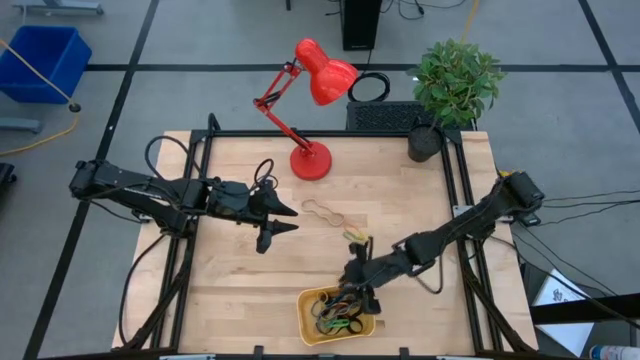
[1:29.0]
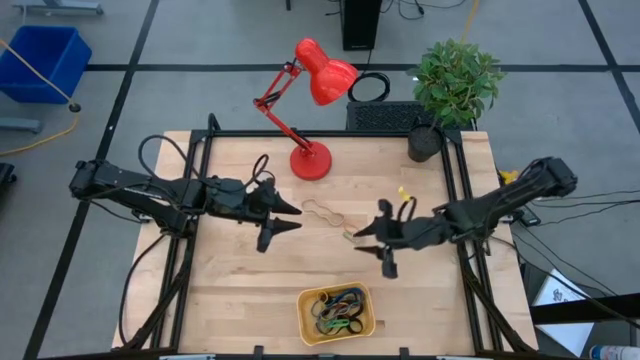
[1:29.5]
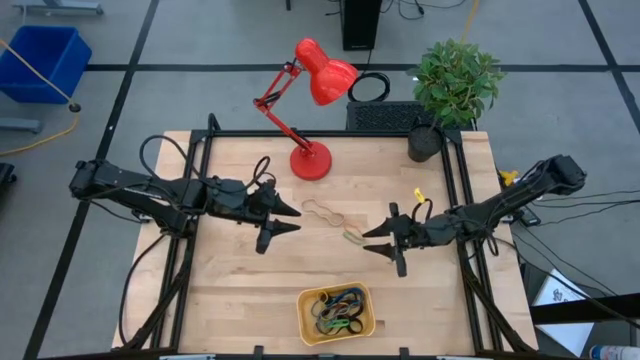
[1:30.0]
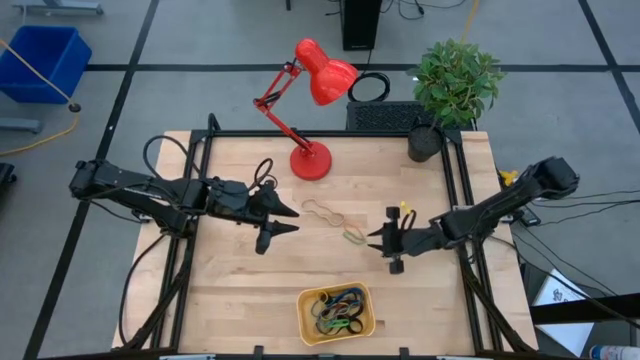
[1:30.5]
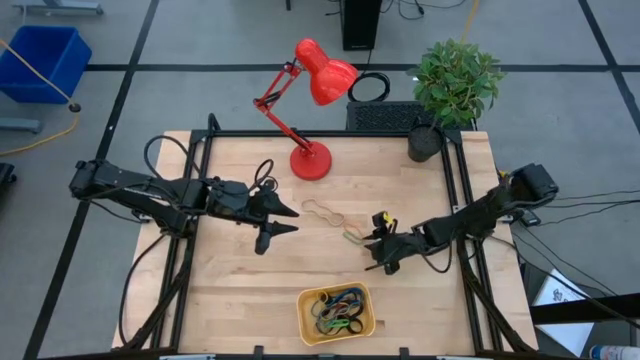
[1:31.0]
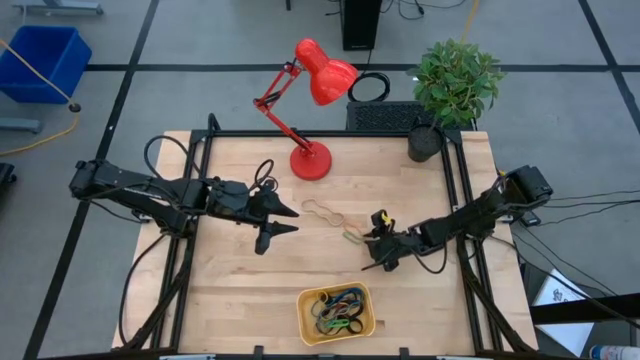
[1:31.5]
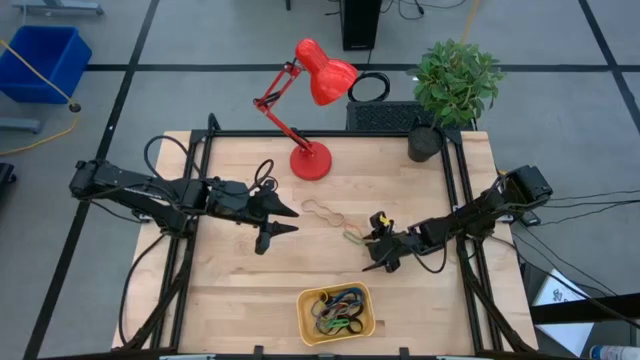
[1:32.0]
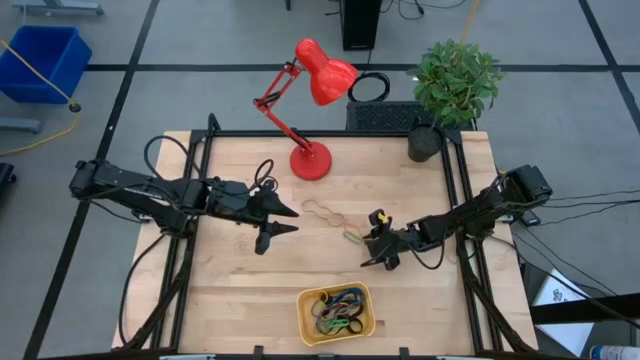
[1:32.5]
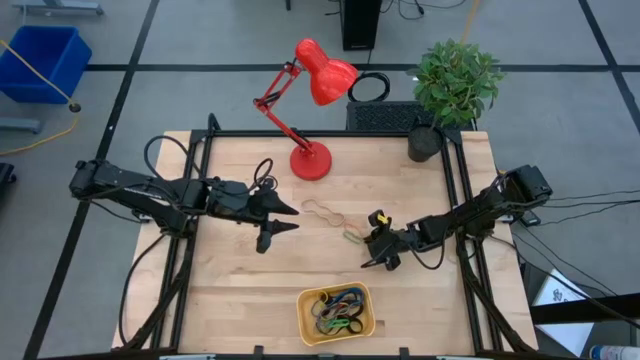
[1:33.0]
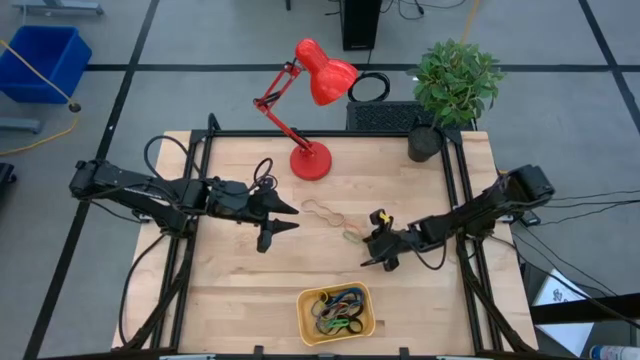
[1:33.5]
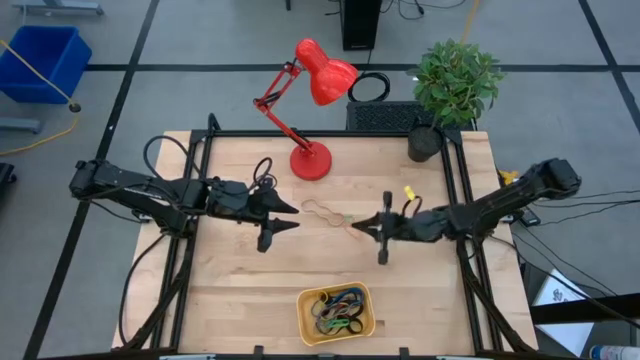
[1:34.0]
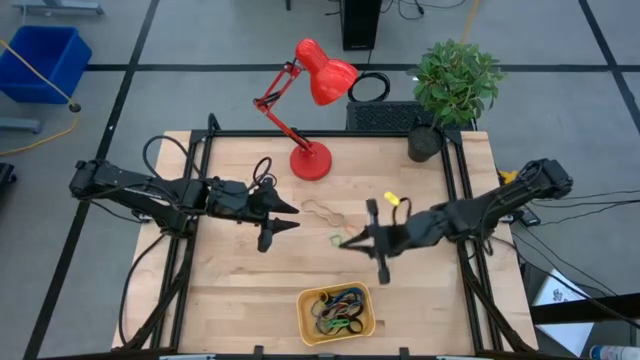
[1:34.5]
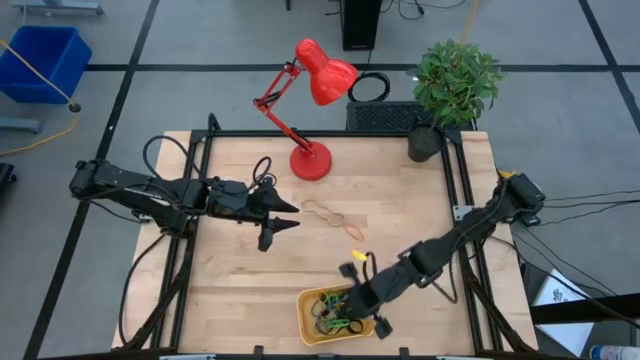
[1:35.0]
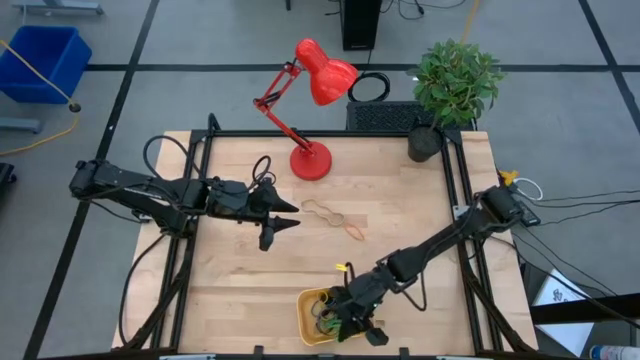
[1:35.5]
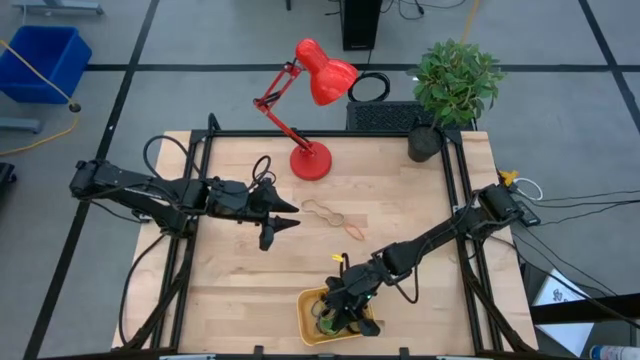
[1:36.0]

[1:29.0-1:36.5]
Task: Pick and place rubber bands into bin
Put the green rubber band into the yellow bin

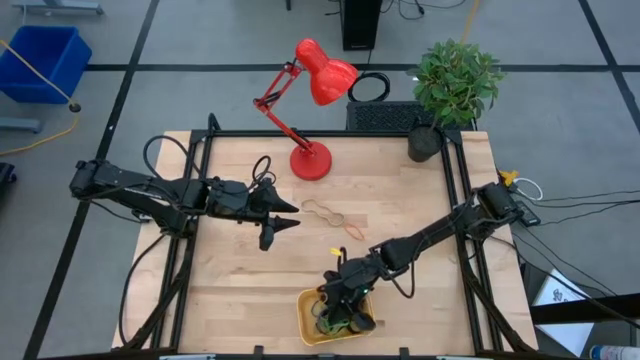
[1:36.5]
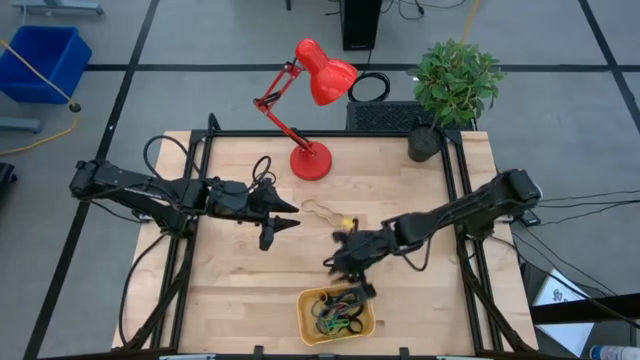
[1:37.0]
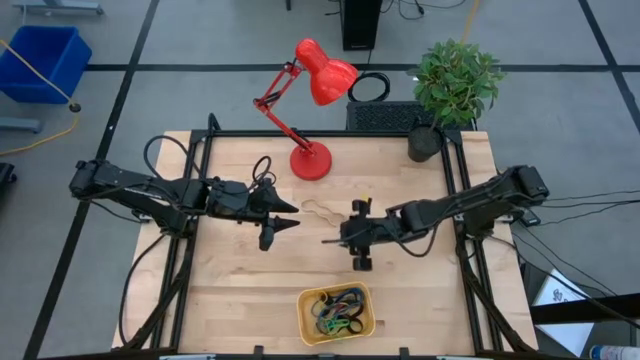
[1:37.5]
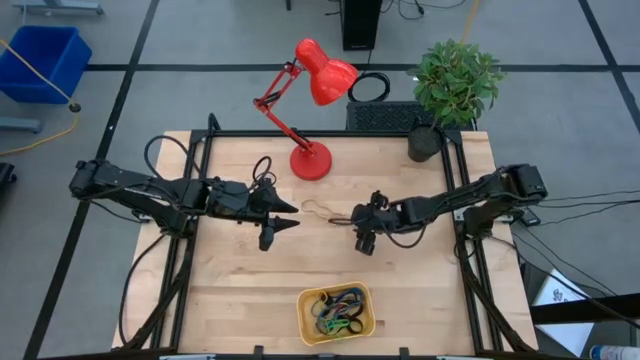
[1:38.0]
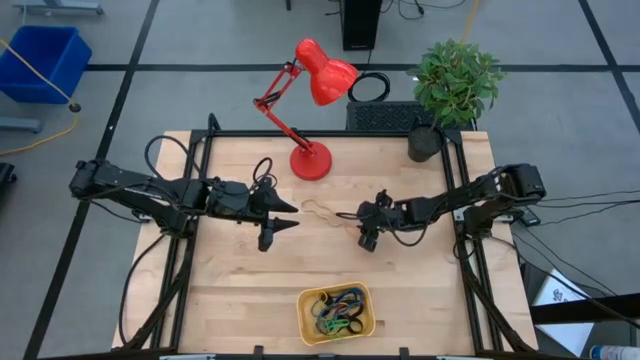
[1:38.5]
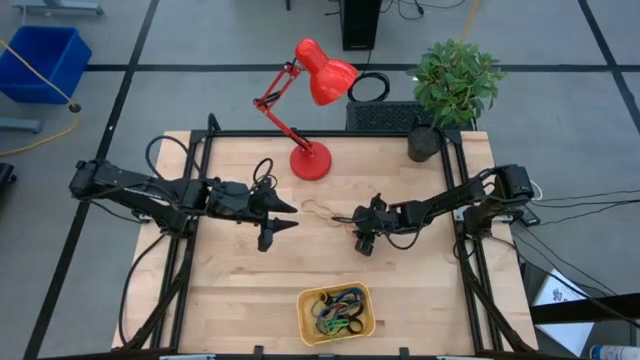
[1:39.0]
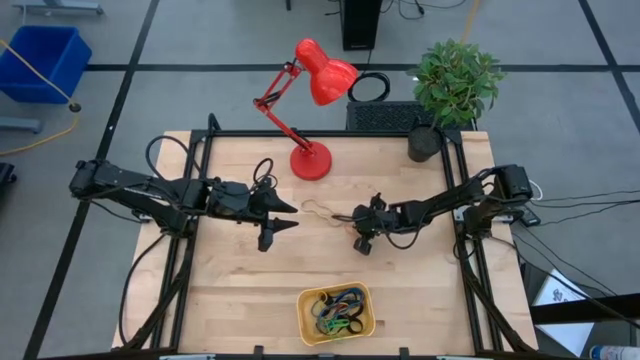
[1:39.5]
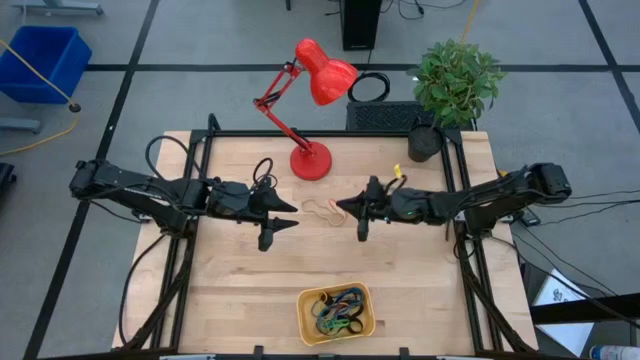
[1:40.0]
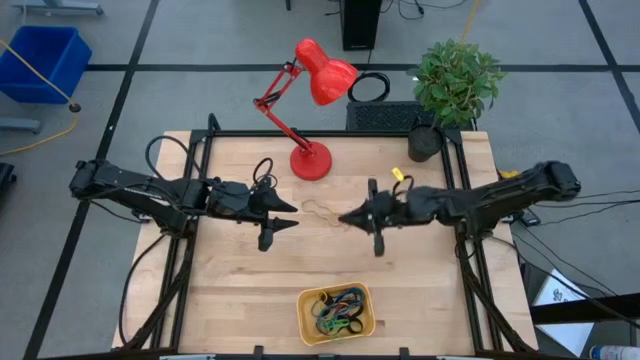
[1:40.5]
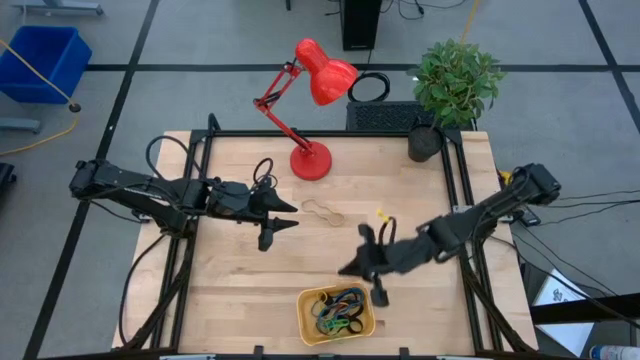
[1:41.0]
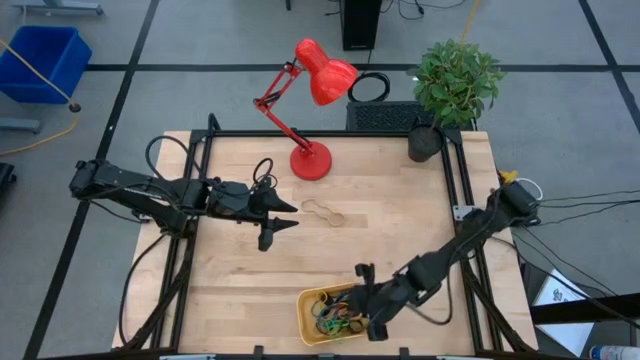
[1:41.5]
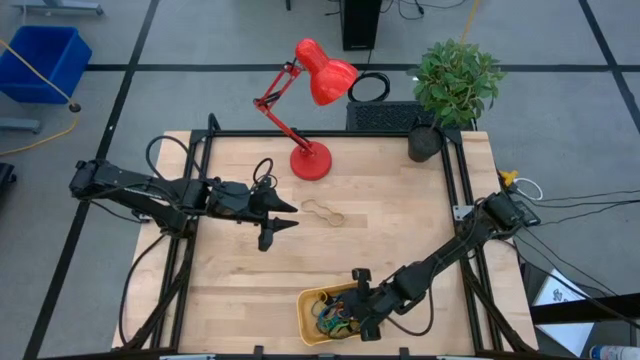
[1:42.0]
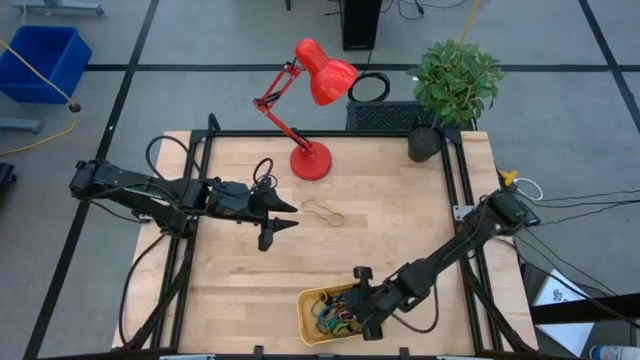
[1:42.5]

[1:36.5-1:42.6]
Put the orange rubber band into the yellow bin

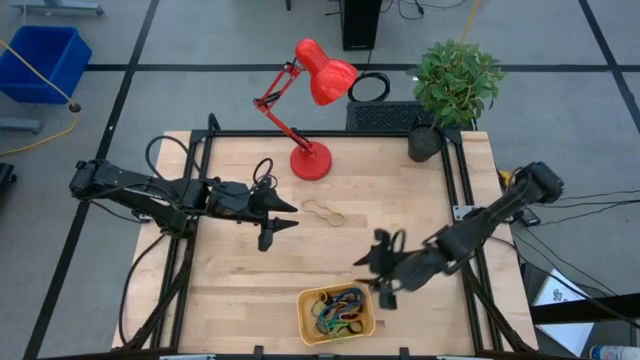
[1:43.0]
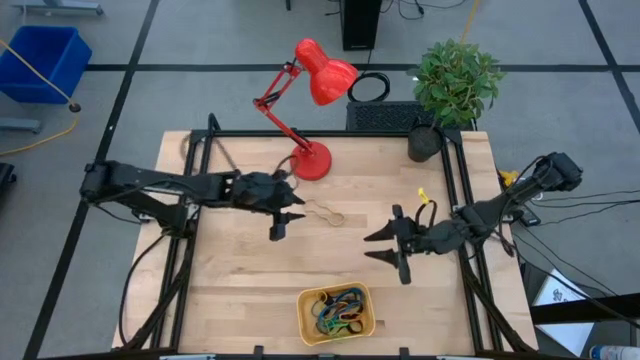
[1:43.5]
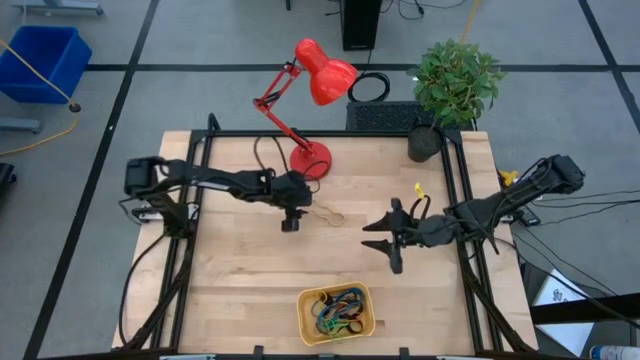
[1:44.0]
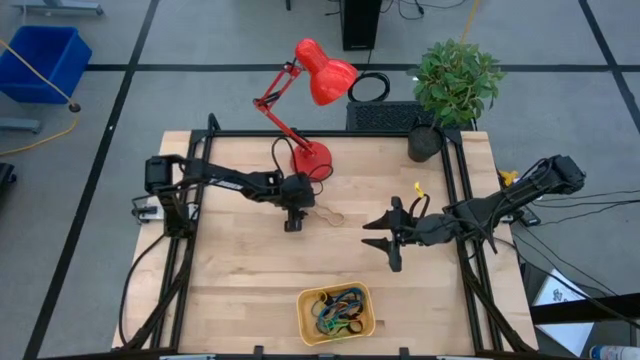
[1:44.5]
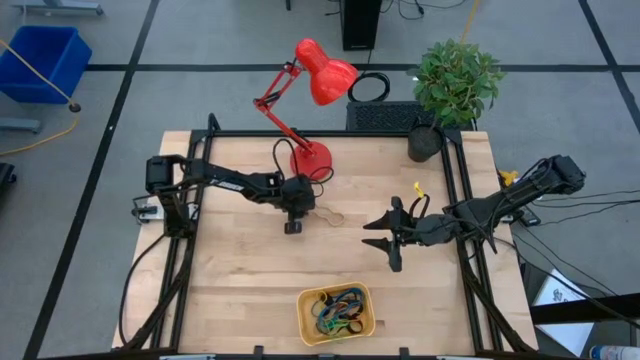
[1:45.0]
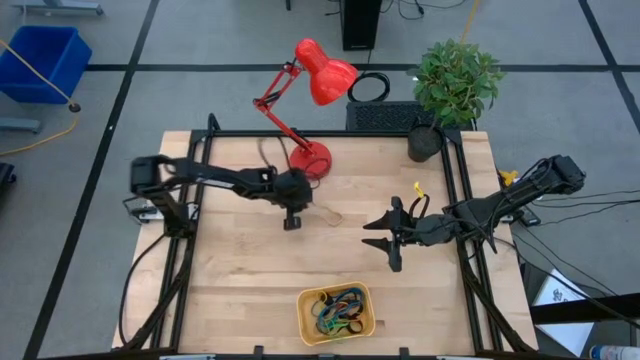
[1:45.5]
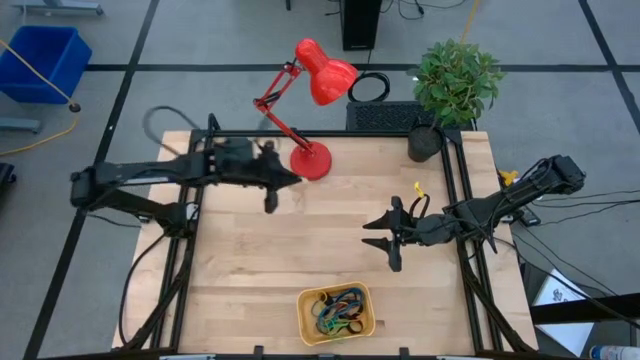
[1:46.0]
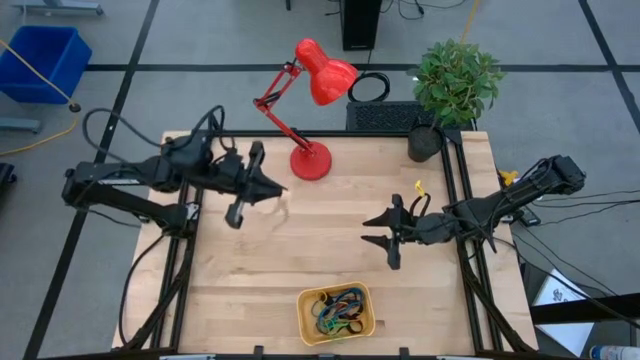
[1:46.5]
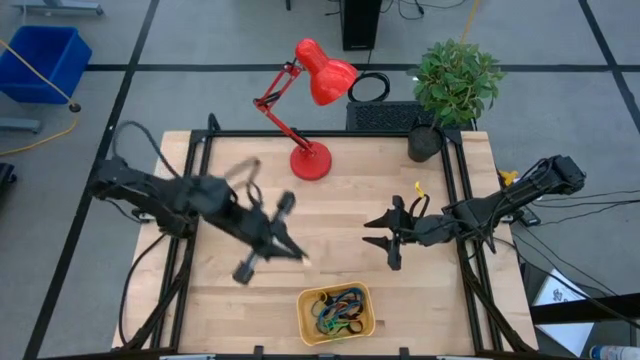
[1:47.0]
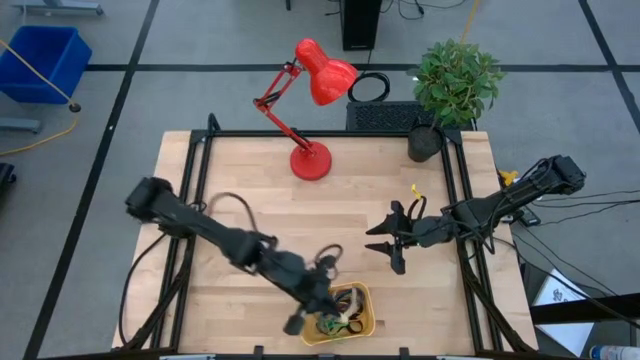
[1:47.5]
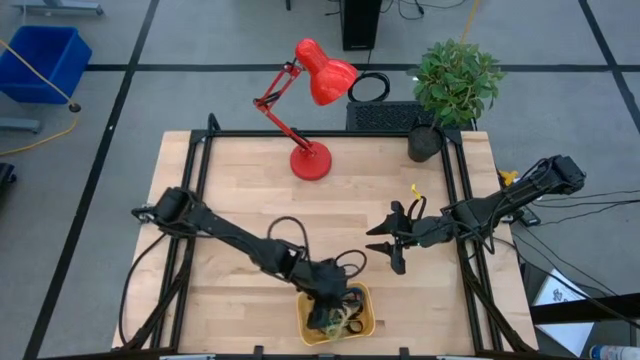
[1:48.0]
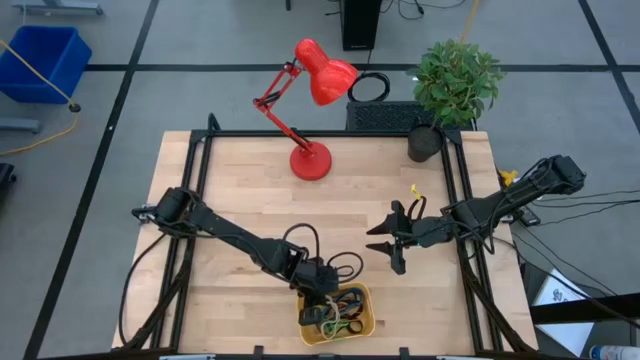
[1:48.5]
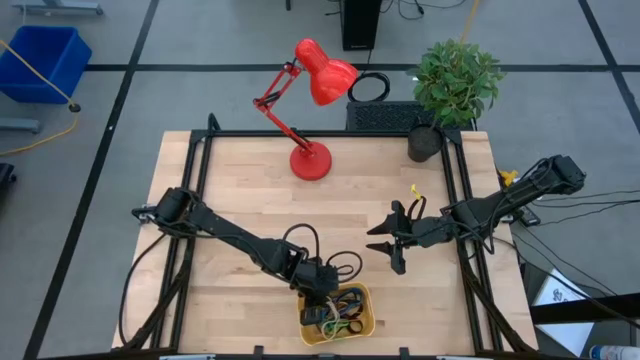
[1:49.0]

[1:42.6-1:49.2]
Put the white rubber band into the yellow bin

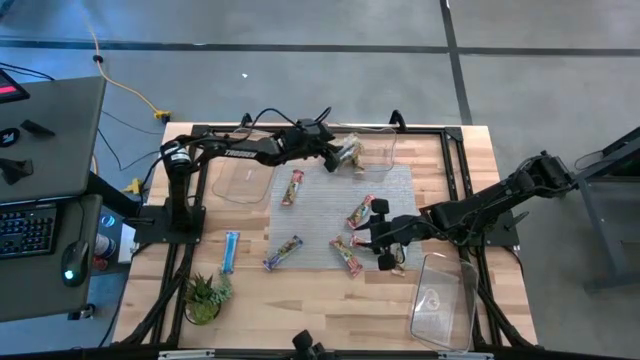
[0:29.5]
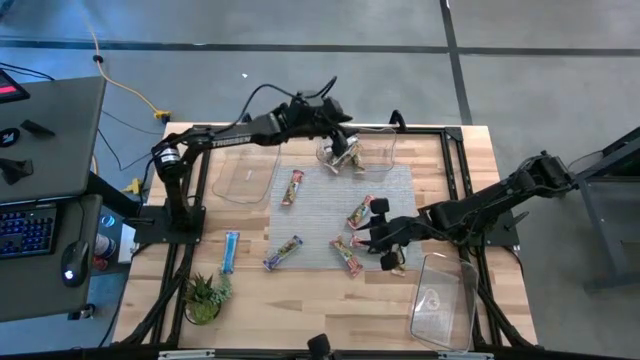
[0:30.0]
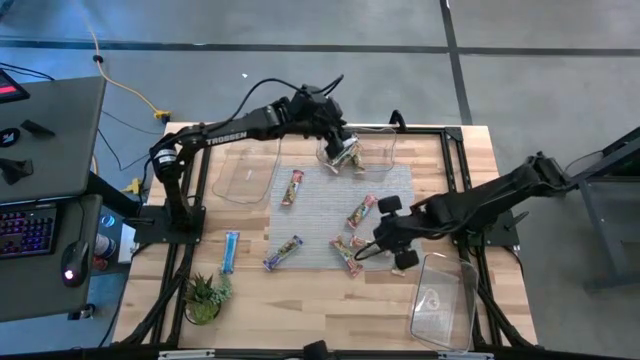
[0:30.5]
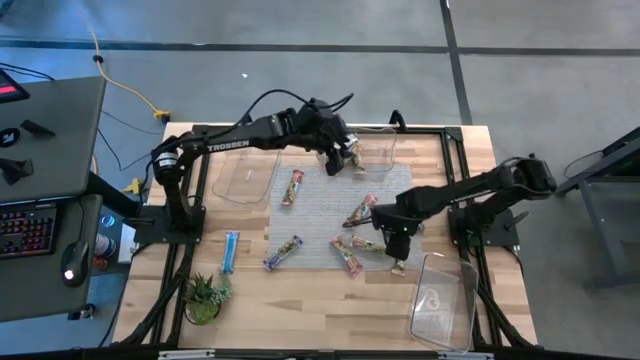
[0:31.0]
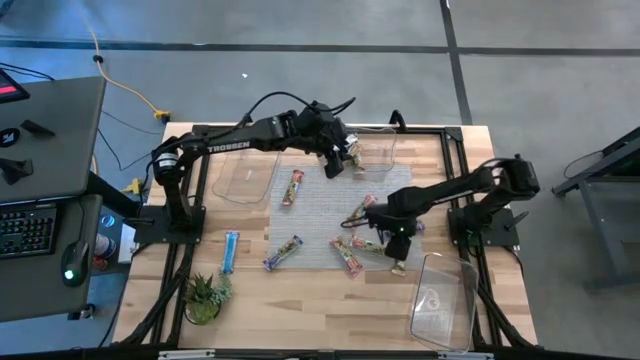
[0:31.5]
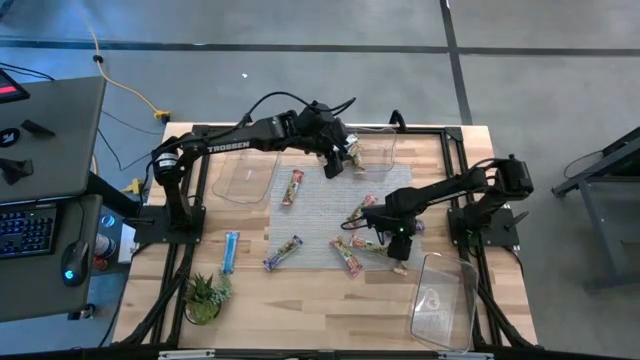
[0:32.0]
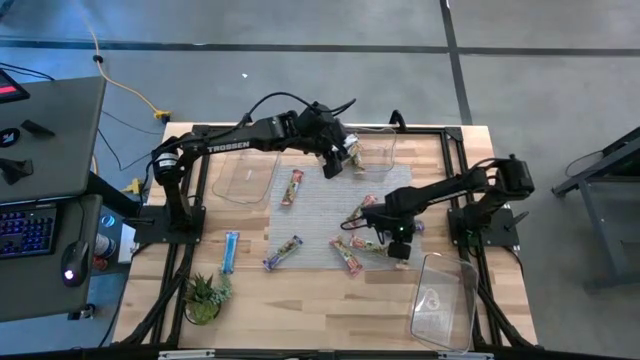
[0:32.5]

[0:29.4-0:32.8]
Task: Pick and place Granola Bars by type
Put the yellow granola bar into the top right transparent bin
